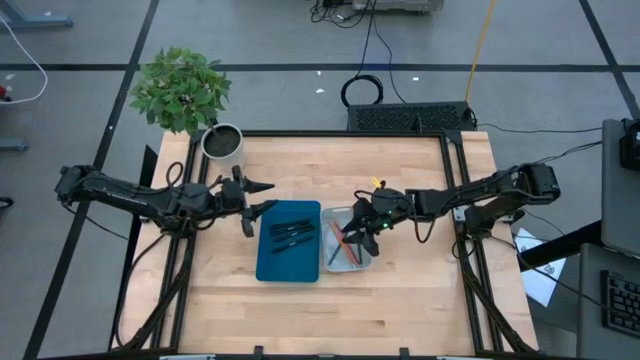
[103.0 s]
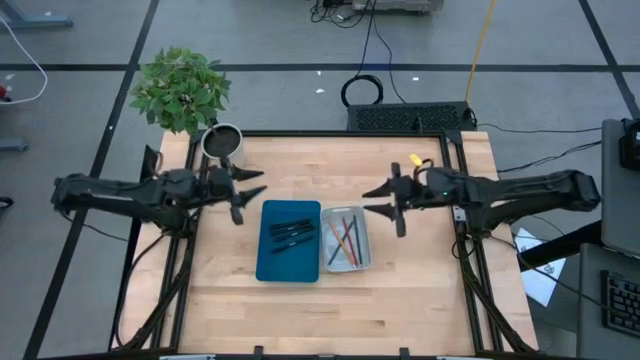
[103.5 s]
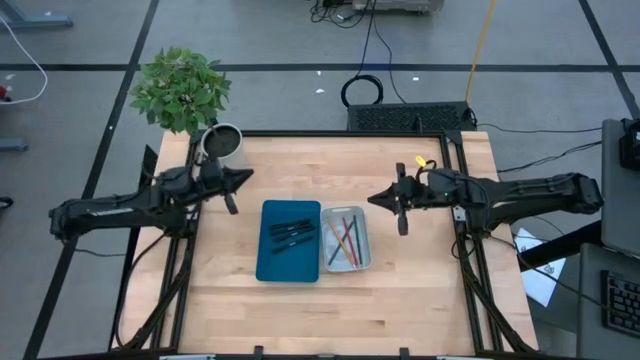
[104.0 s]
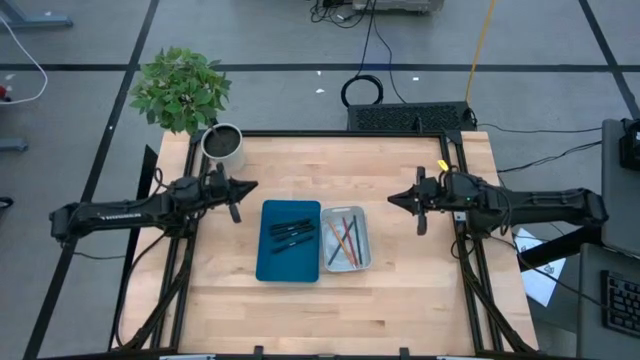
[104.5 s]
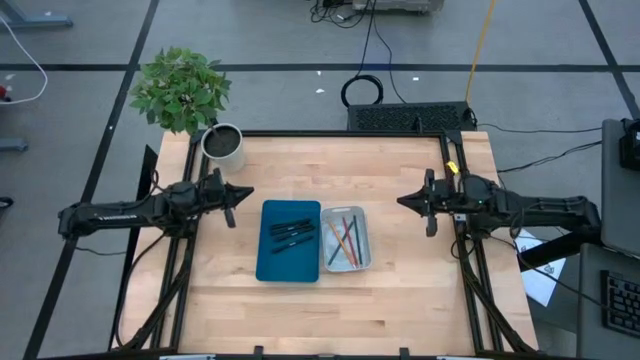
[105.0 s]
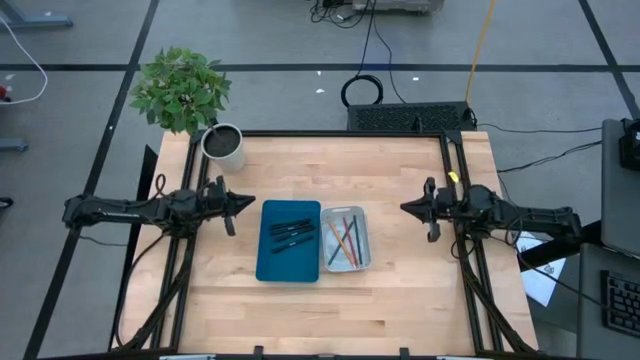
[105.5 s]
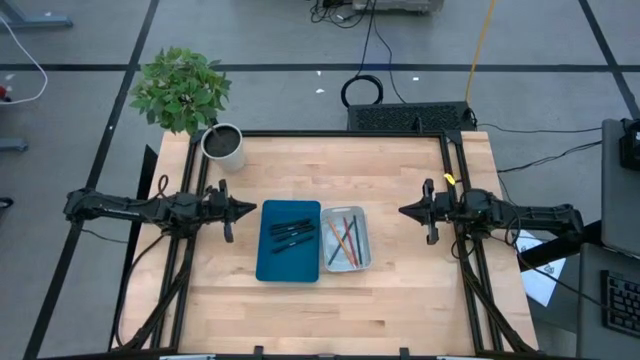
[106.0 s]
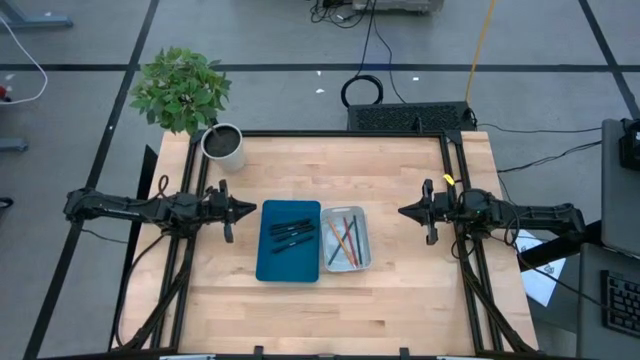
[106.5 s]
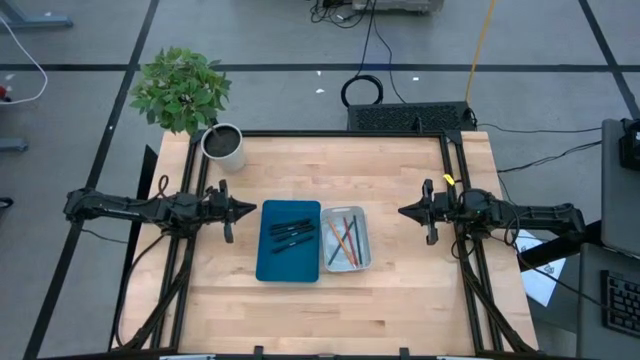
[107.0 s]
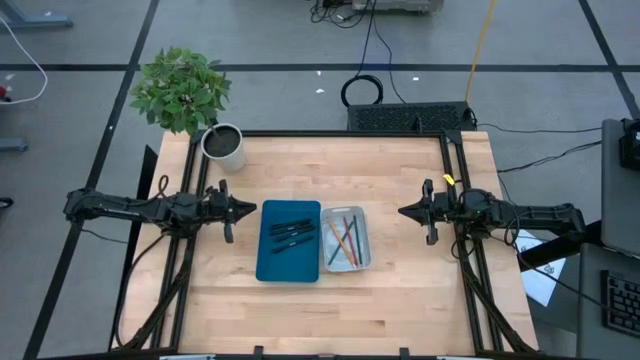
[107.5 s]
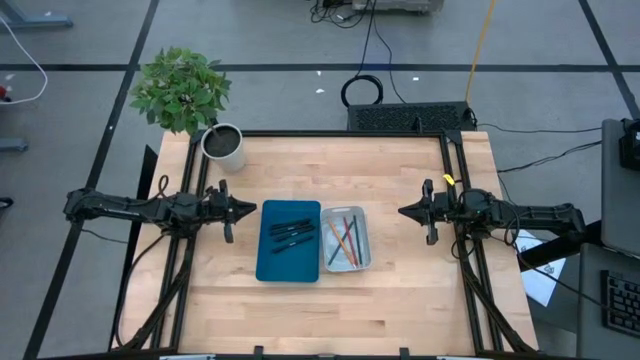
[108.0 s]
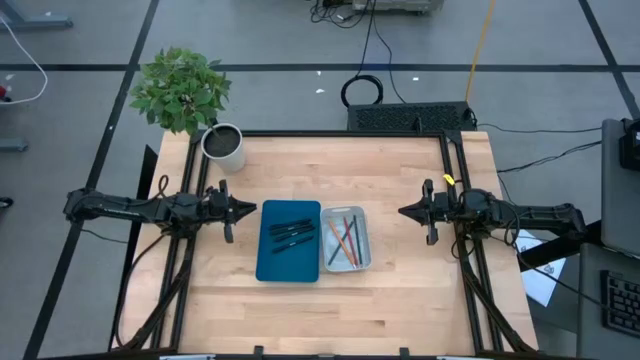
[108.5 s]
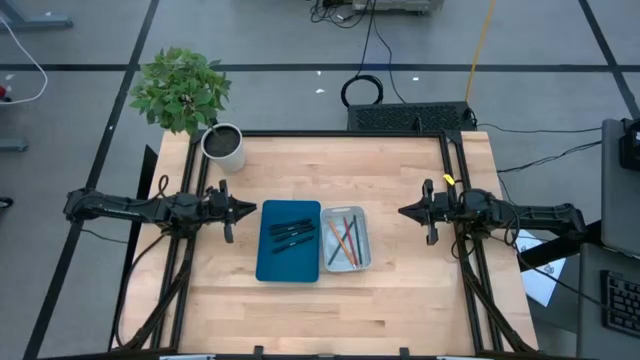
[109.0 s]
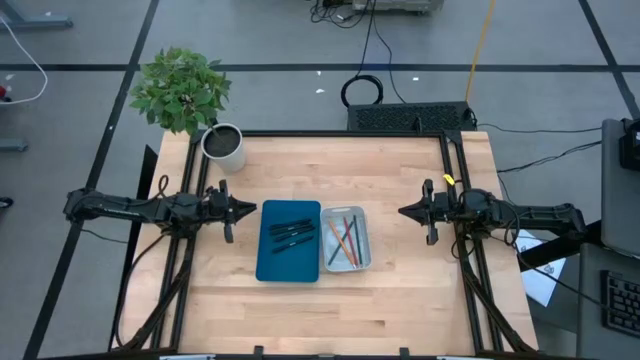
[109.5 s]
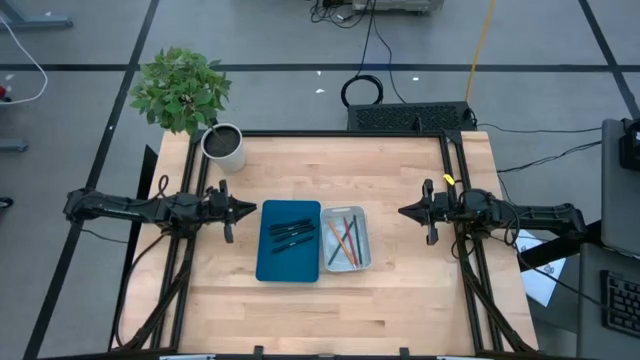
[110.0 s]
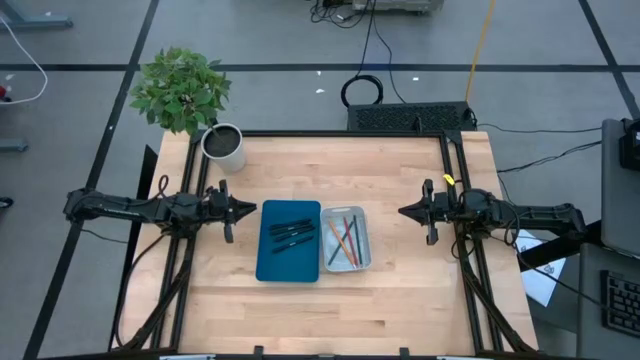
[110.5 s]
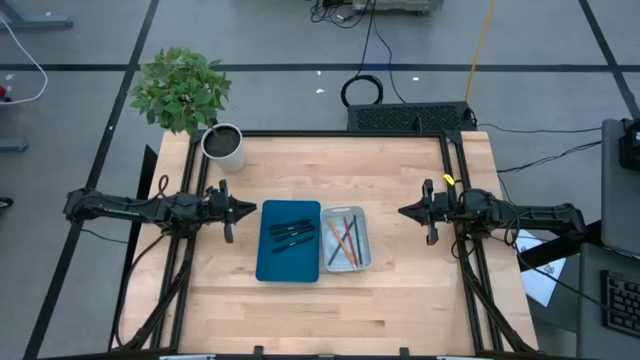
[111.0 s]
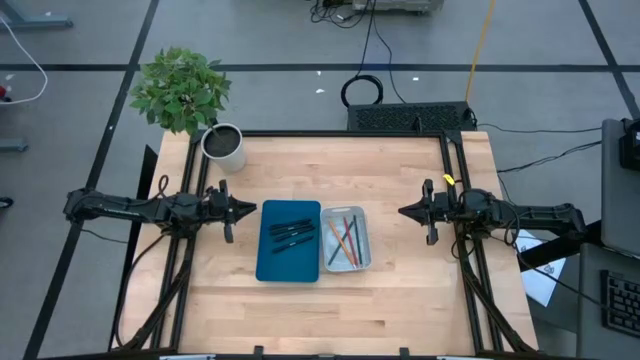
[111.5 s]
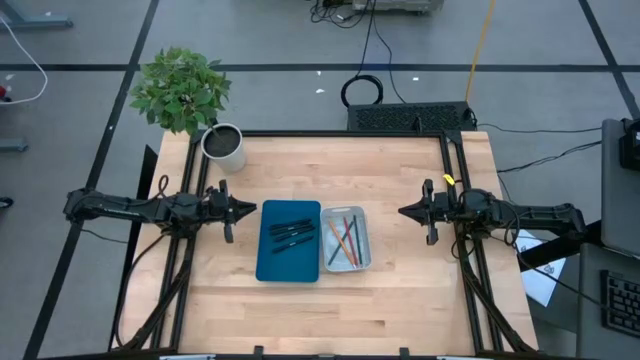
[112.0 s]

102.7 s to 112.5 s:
Task: Sort pens & pencils
Return to Home Position

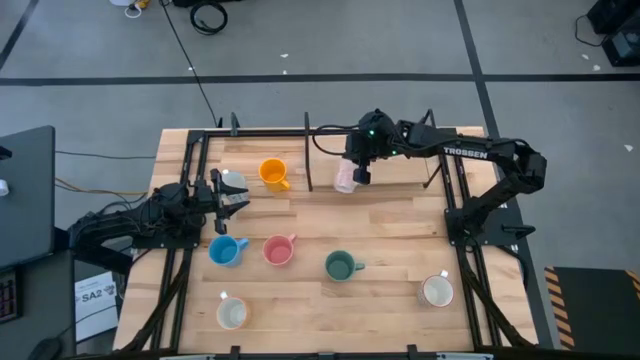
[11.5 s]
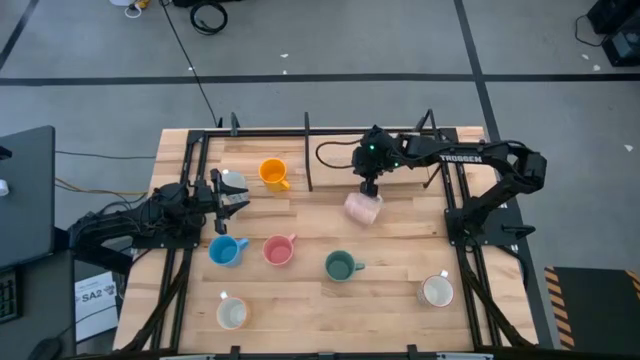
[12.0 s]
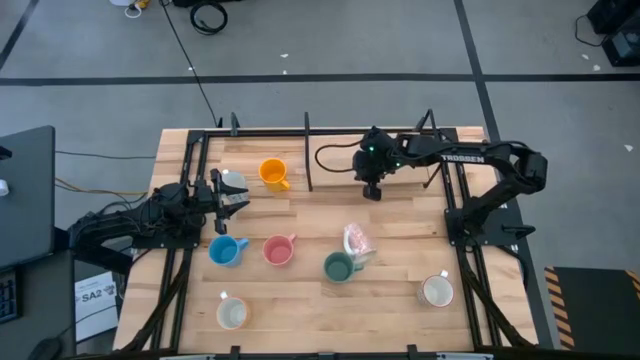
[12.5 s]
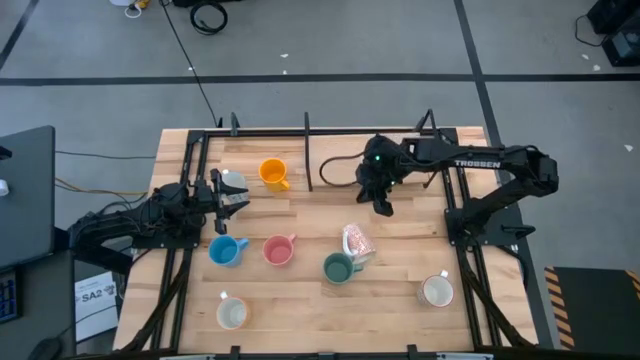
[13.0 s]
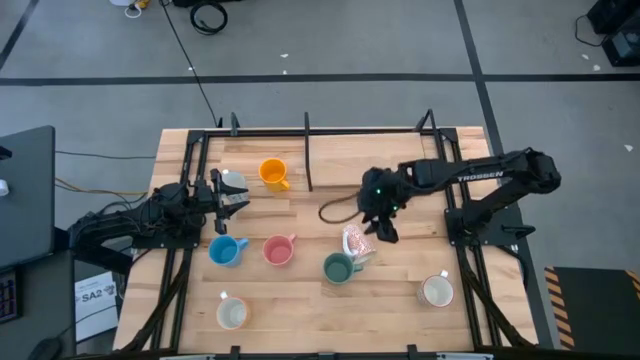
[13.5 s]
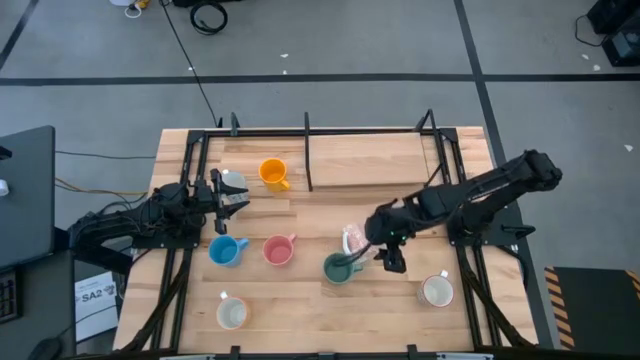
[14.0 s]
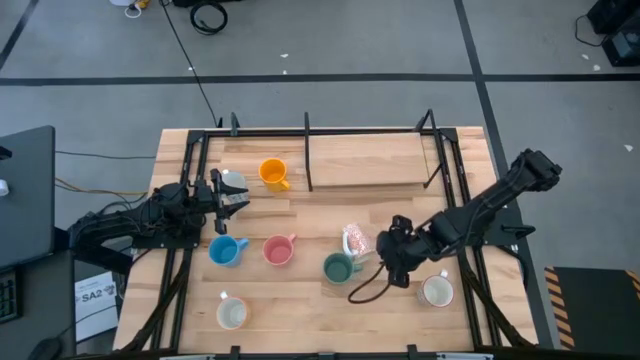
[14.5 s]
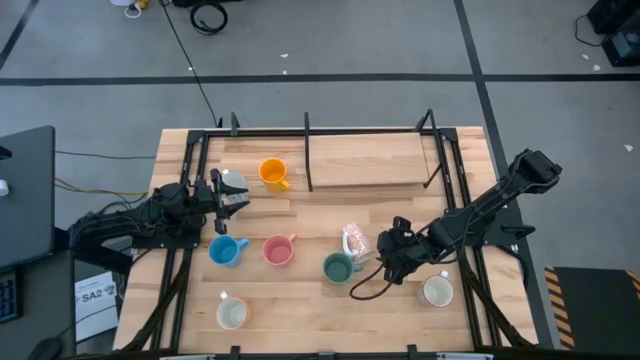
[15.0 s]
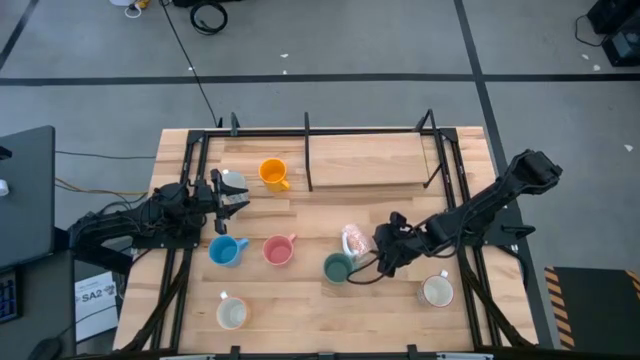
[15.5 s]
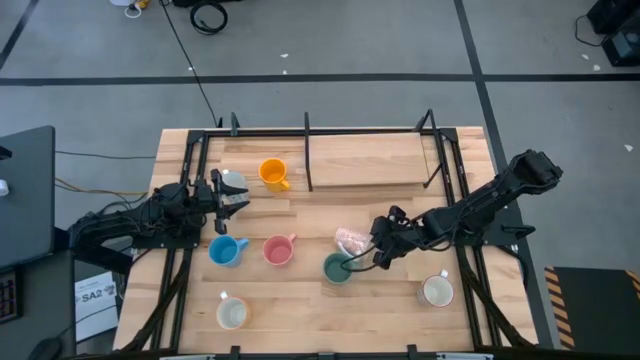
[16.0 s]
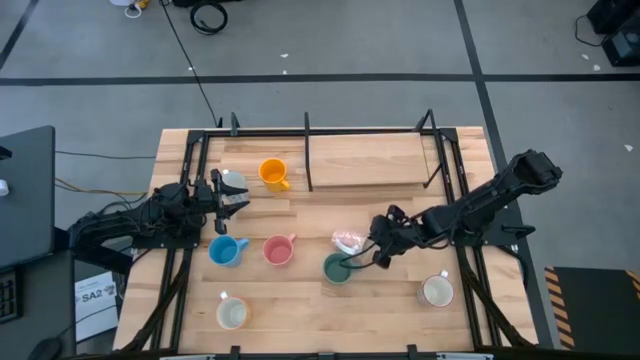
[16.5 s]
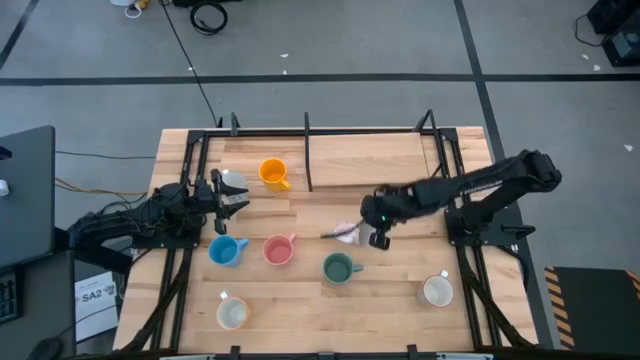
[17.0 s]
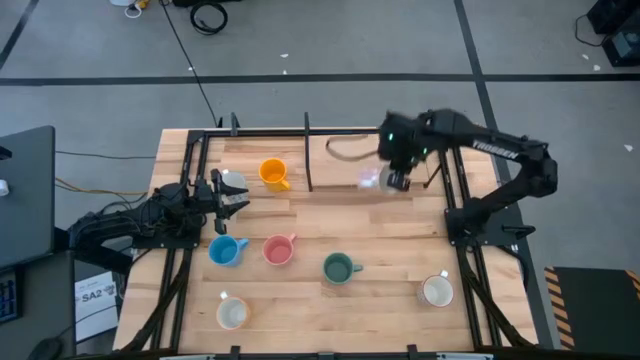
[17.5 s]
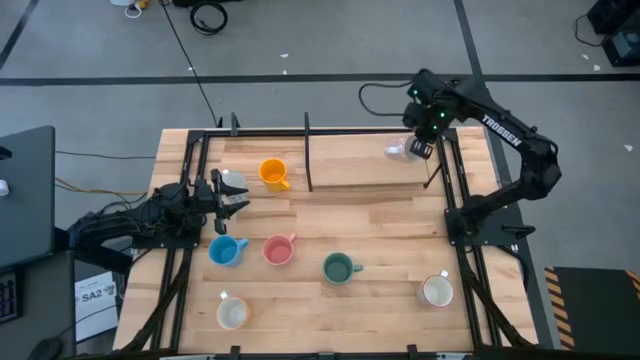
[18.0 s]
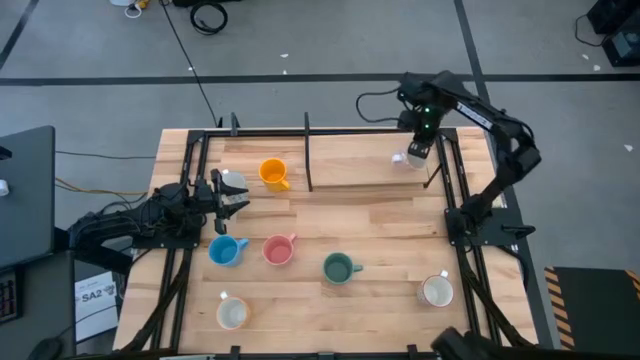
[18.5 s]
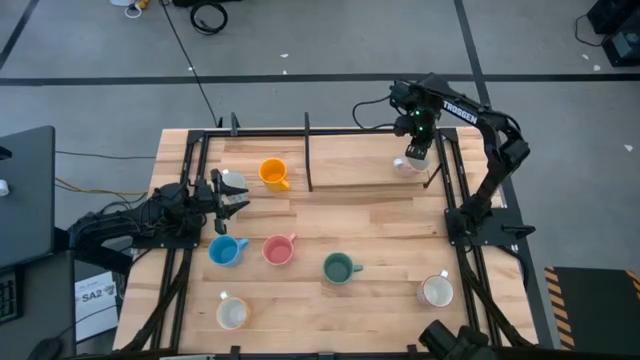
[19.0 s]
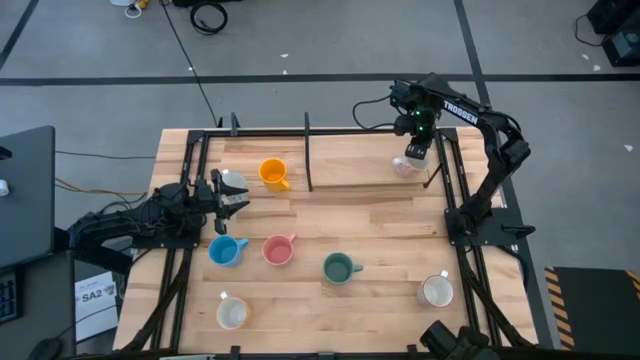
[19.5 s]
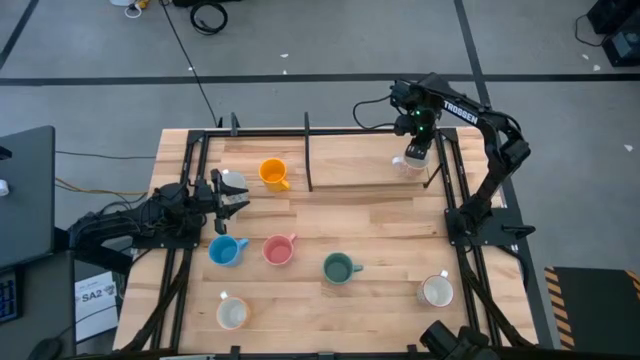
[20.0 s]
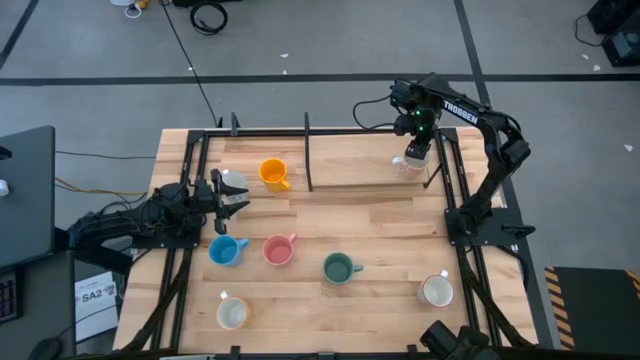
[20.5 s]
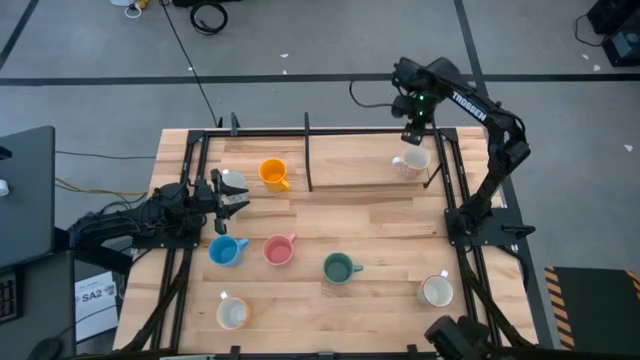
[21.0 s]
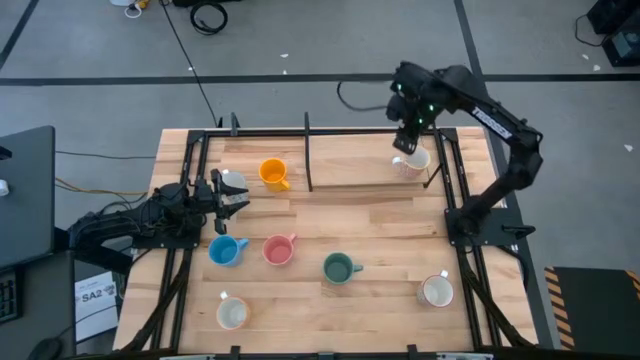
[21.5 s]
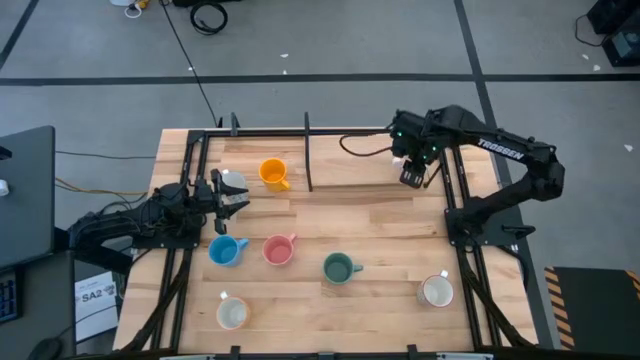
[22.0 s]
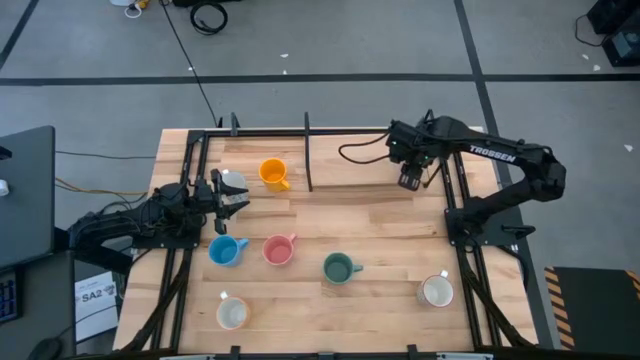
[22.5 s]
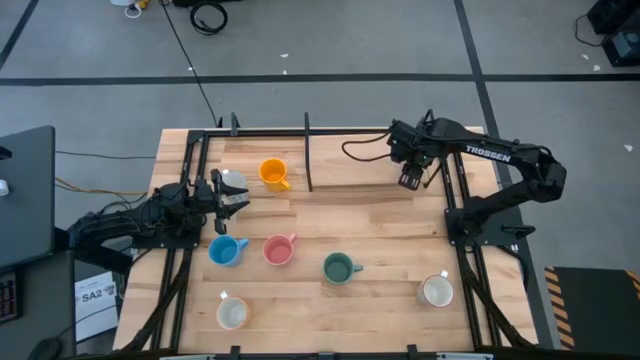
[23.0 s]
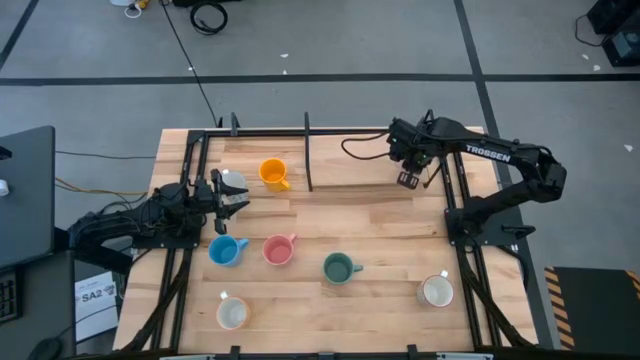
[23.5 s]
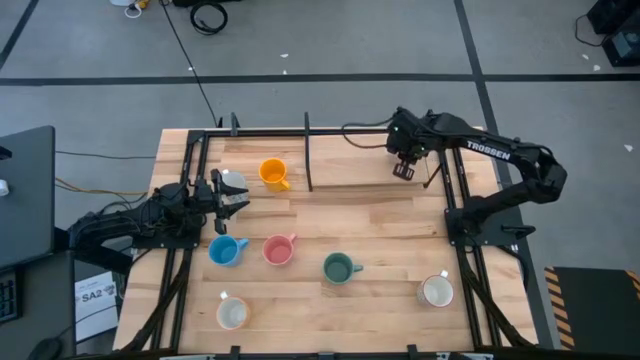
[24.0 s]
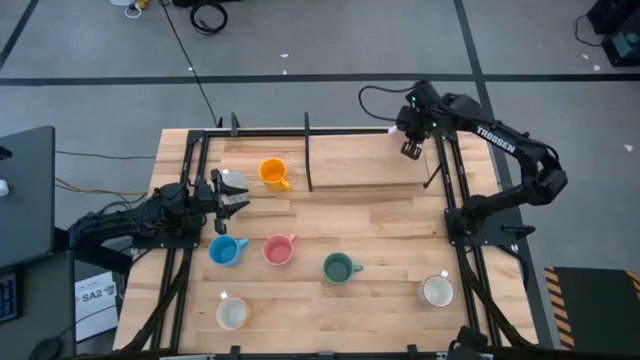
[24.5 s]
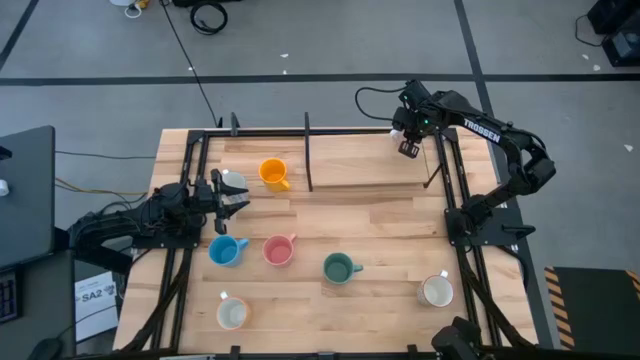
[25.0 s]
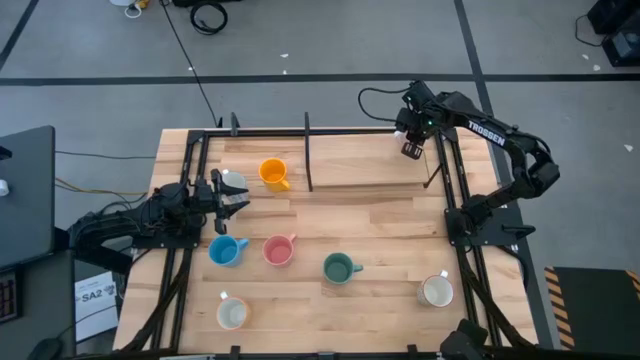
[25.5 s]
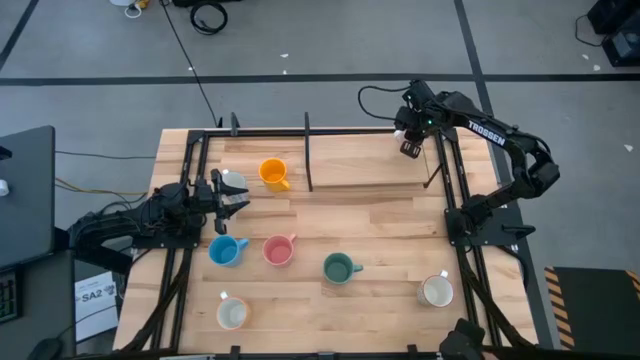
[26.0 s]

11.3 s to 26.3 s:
Task: Place coffee mugs
Put the orange and white patterned mug on the shelf
